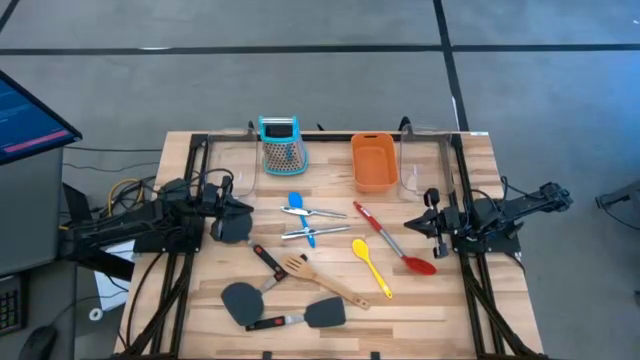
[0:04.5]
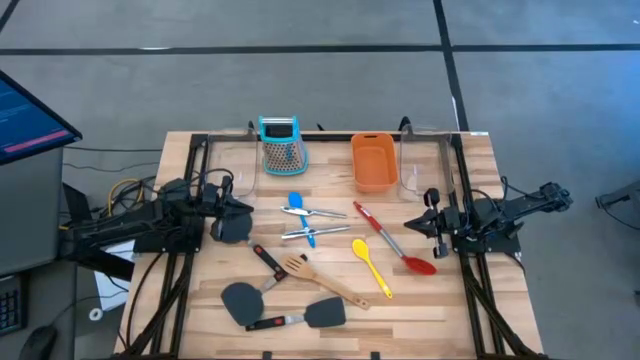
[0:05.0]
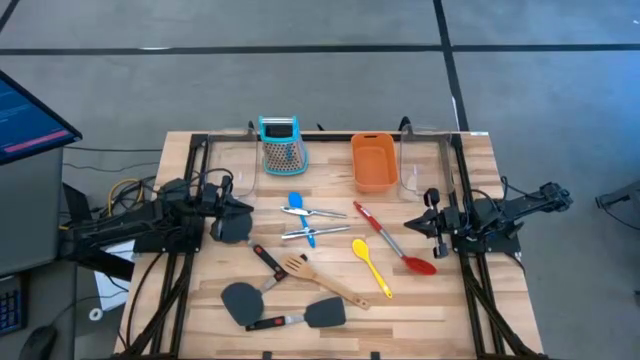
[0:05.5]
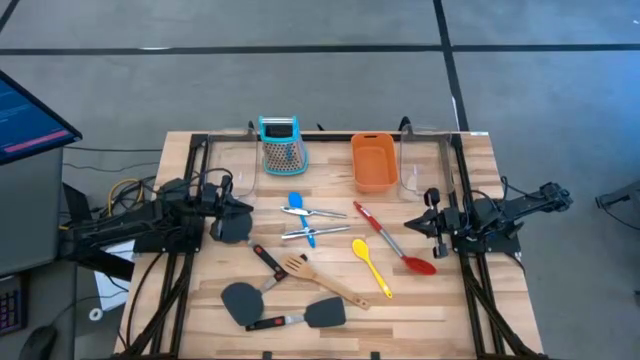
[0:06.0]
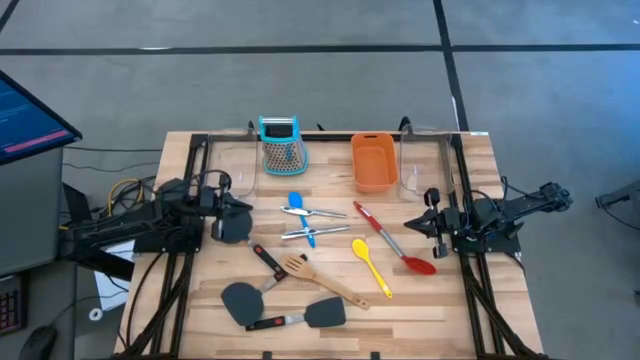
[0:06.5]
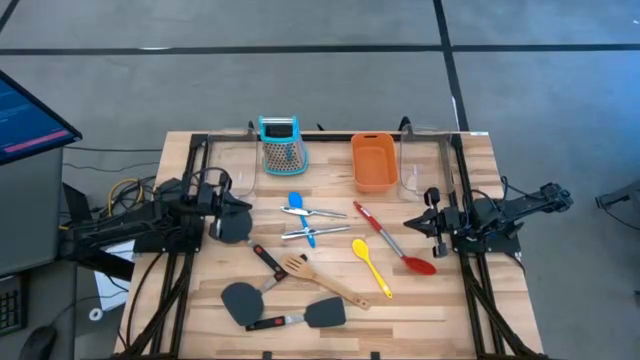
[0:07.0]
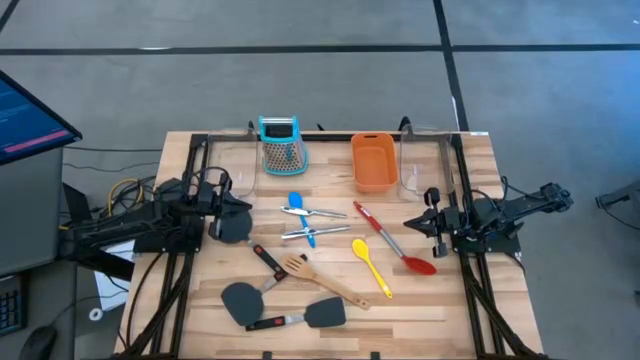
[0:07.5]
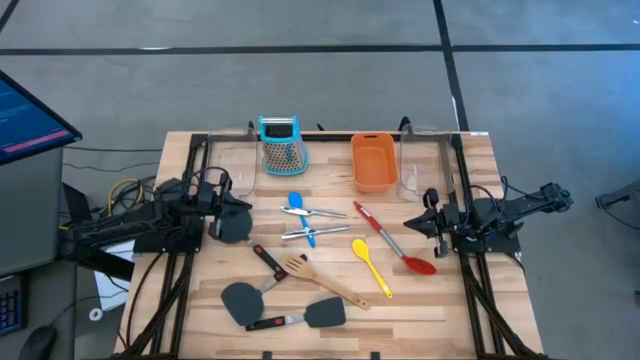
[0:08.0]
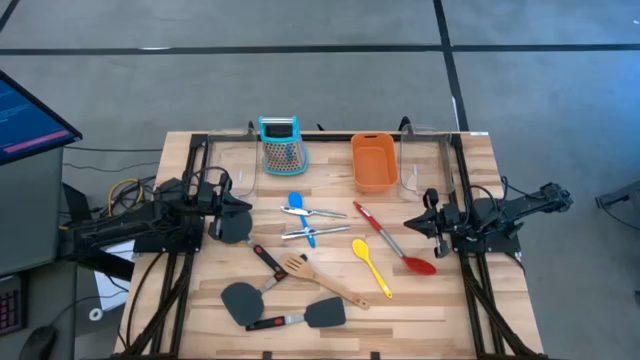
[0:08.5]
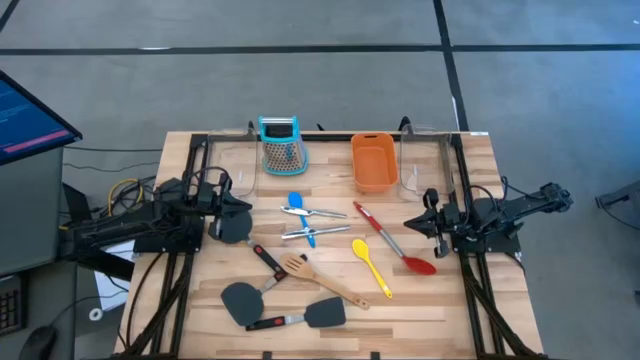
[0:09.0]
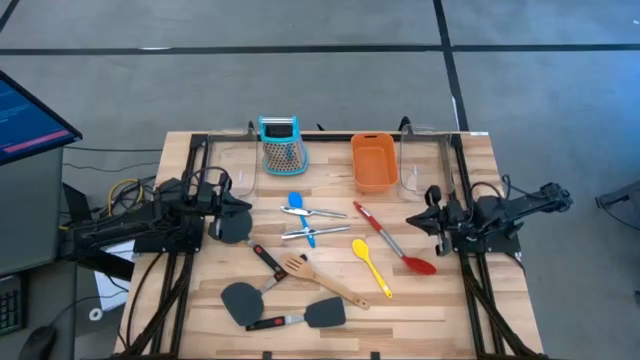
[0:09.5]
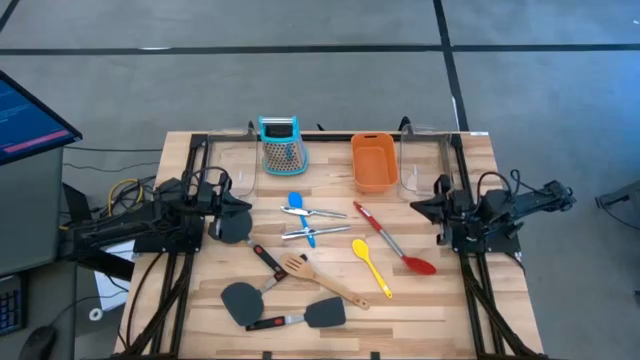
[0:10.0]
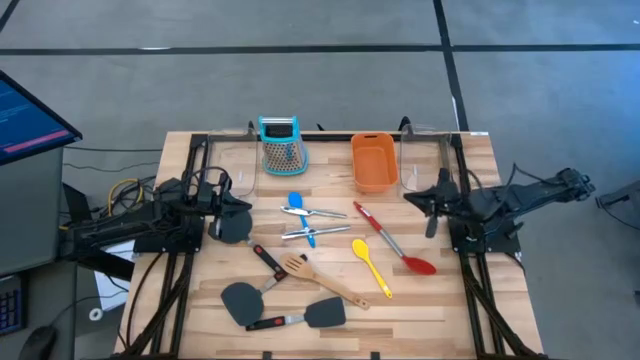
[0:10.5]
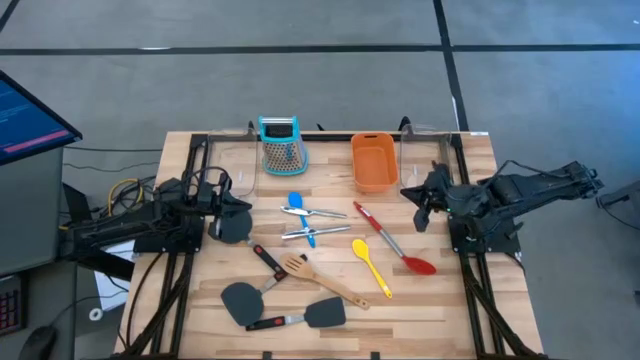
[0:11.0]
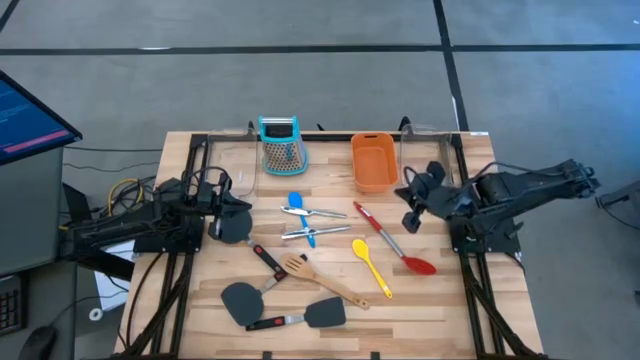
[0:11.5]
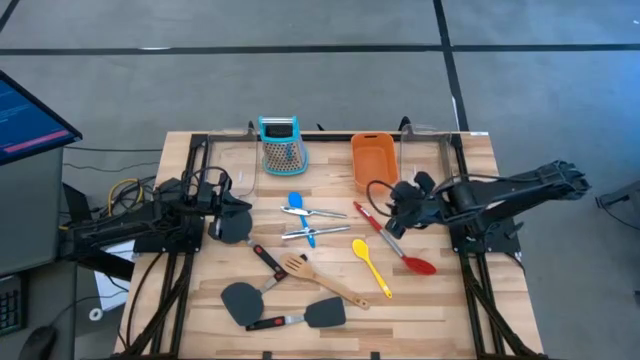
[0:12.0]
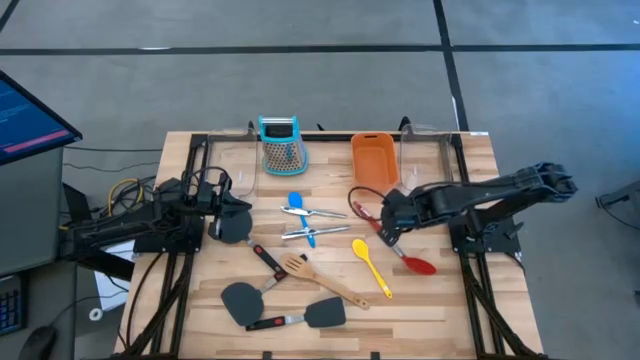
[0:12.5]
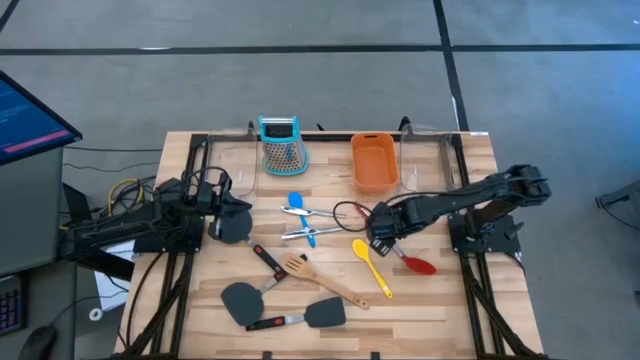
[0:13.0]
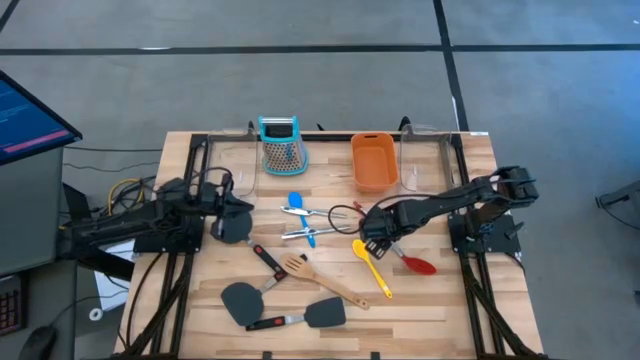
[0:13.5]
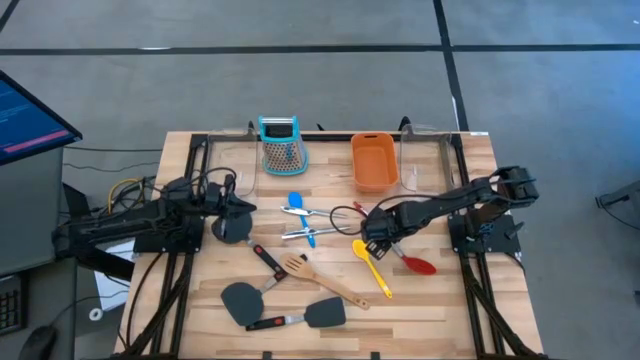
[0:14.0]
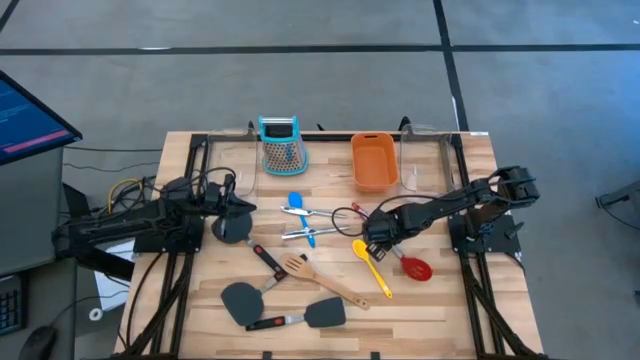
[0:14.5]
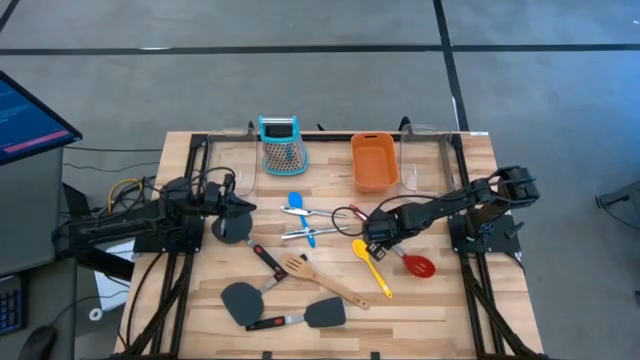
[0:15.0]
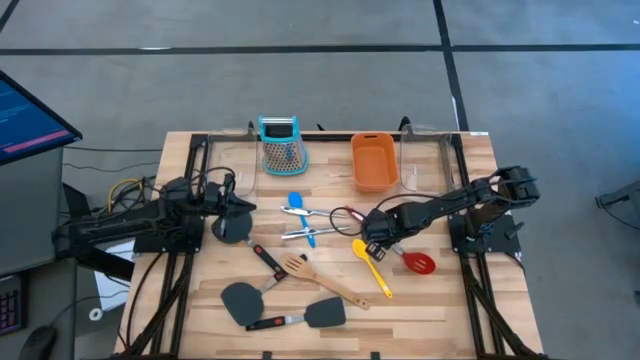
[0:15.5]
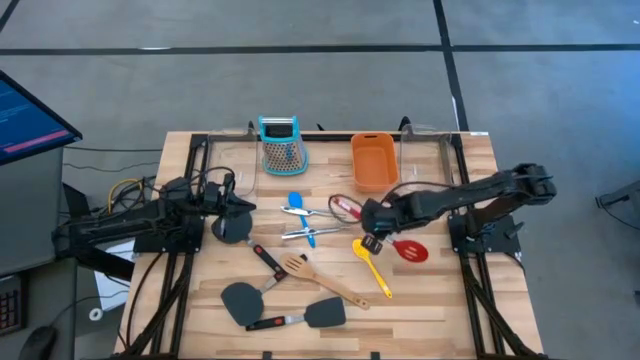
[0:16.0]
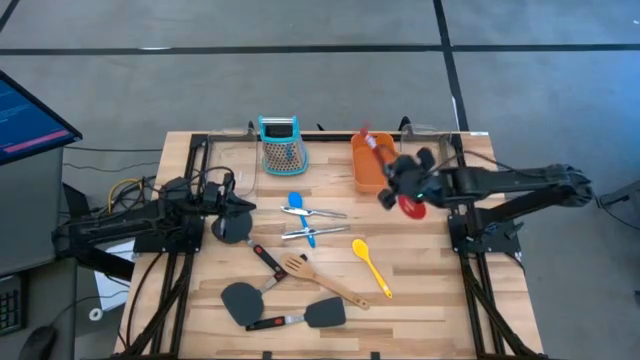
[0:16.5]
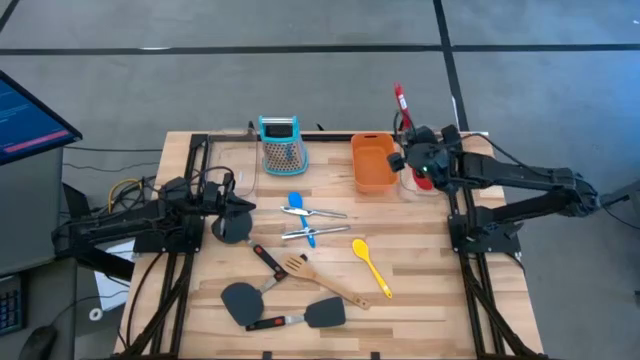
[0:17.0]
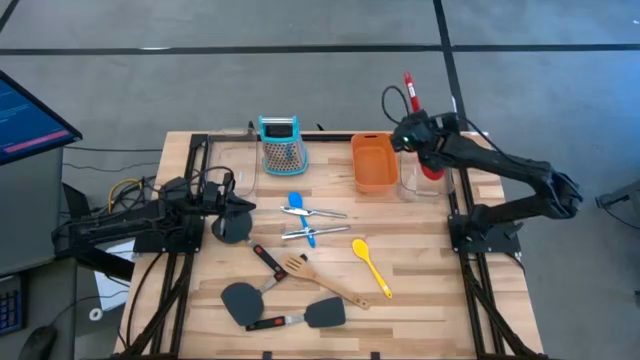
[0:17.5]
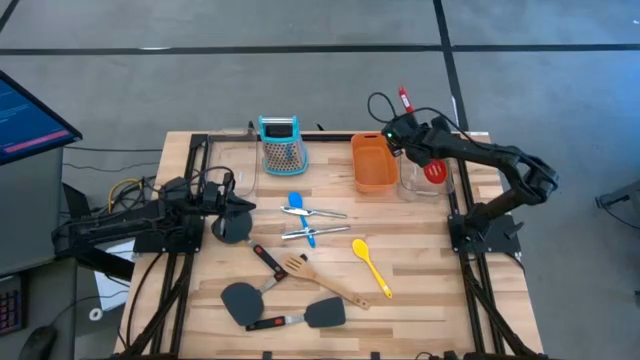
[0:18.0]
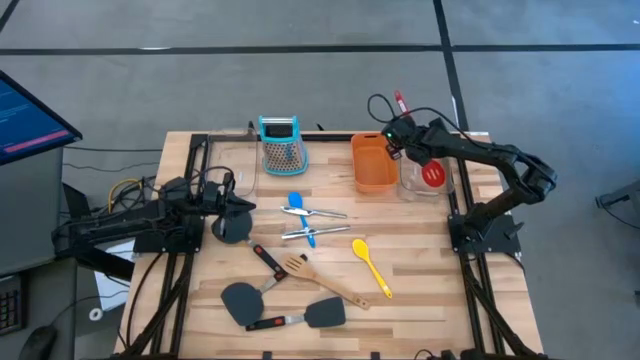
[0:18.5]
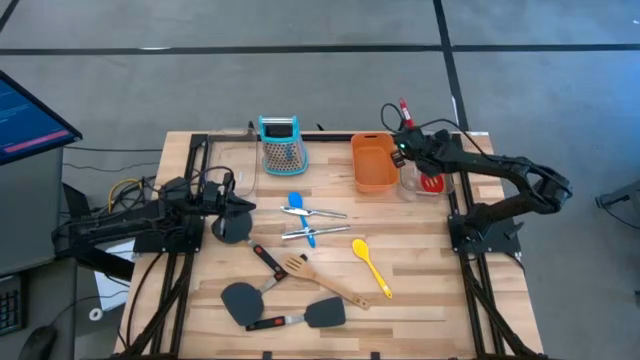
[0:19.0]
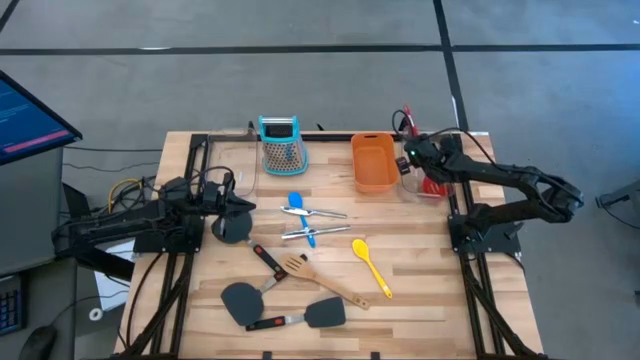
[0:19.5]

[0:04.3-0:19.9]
Task: Pick & Place Kitchen Items
Put the red spatula into the right transparent bin

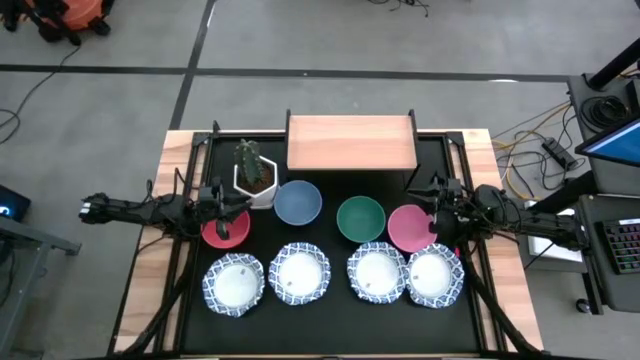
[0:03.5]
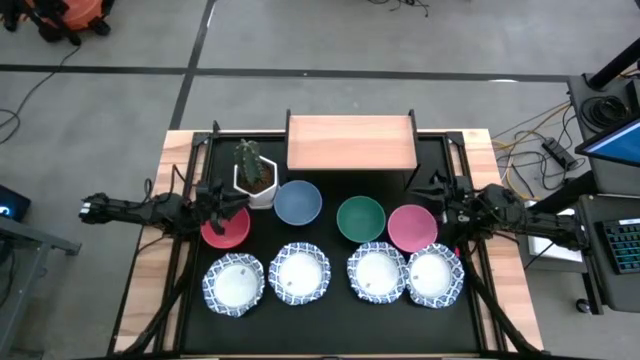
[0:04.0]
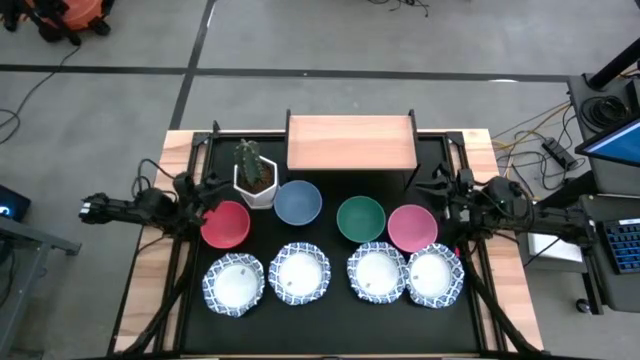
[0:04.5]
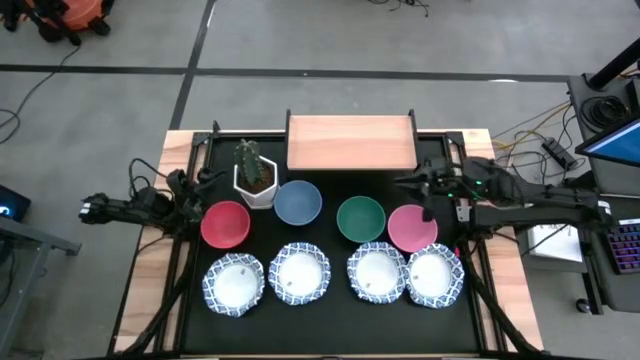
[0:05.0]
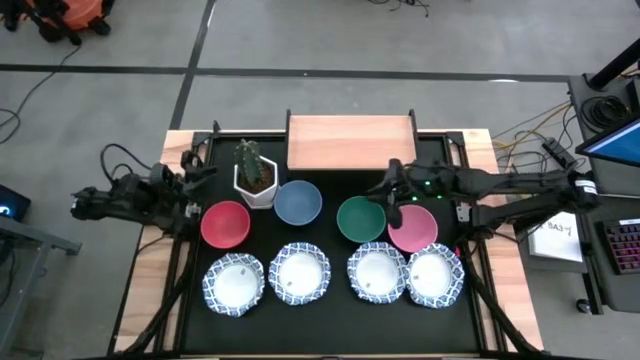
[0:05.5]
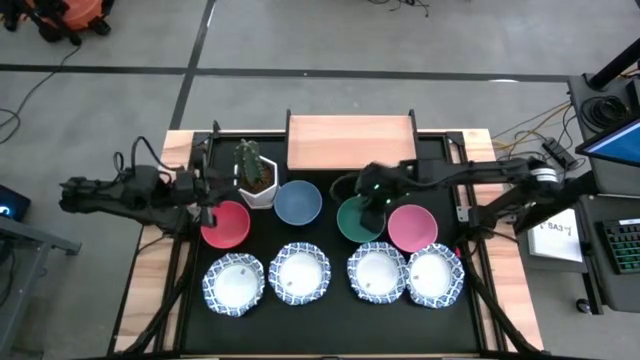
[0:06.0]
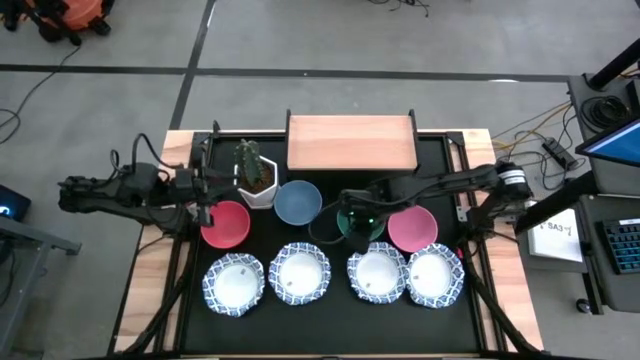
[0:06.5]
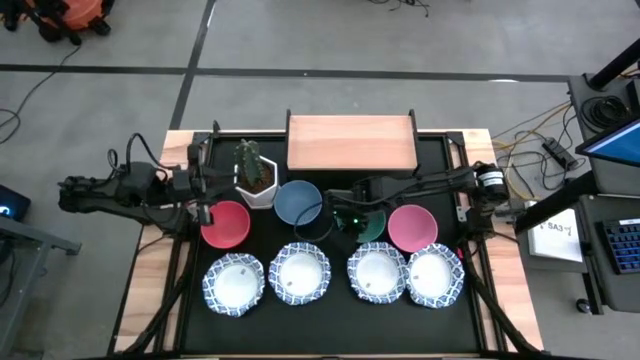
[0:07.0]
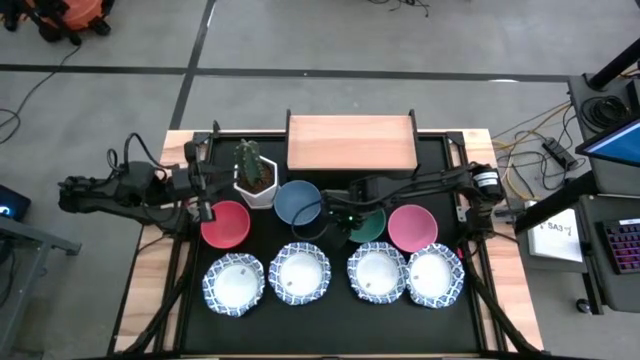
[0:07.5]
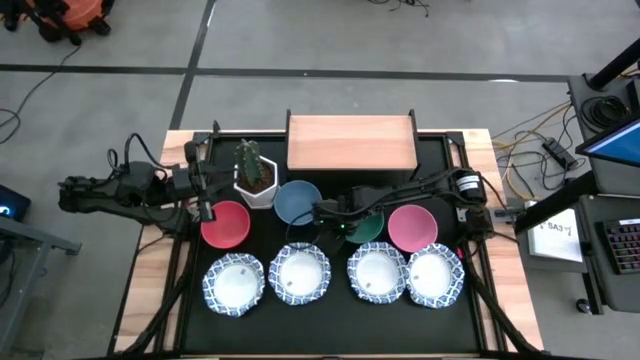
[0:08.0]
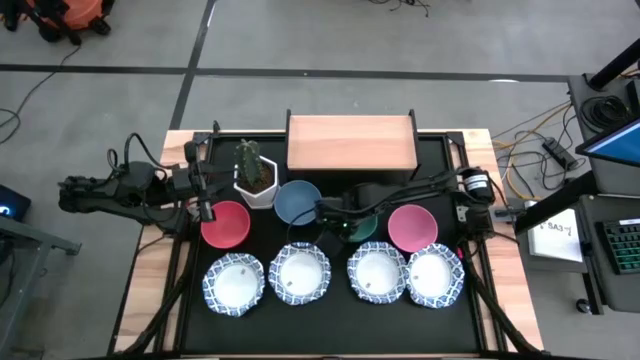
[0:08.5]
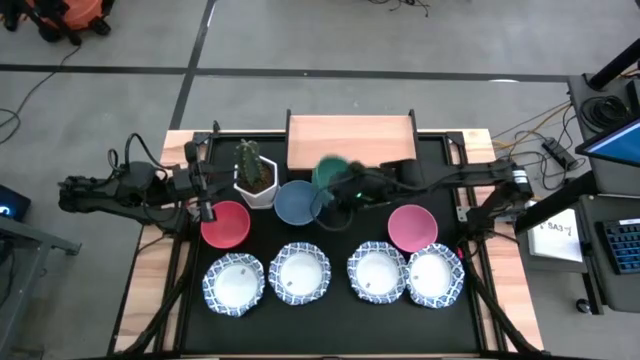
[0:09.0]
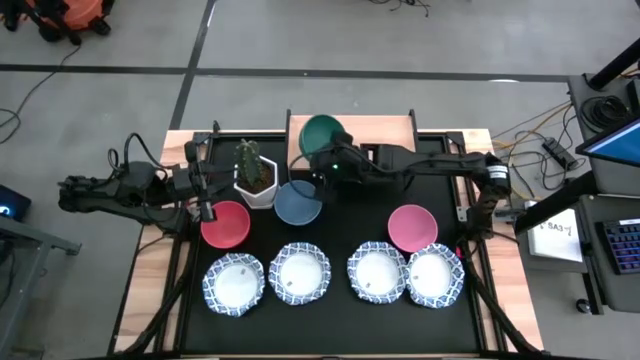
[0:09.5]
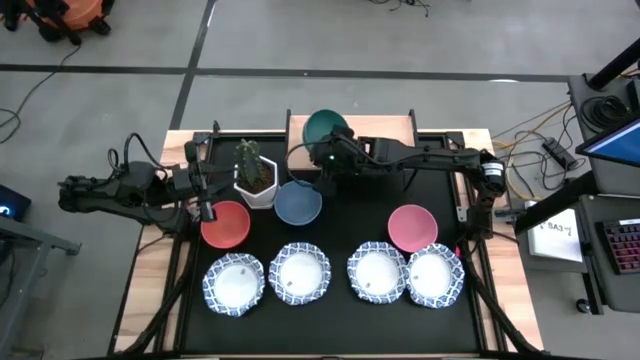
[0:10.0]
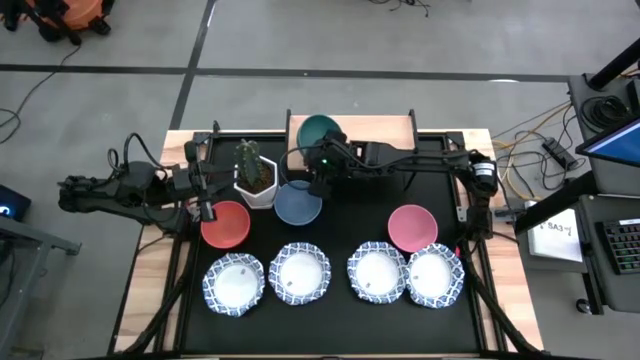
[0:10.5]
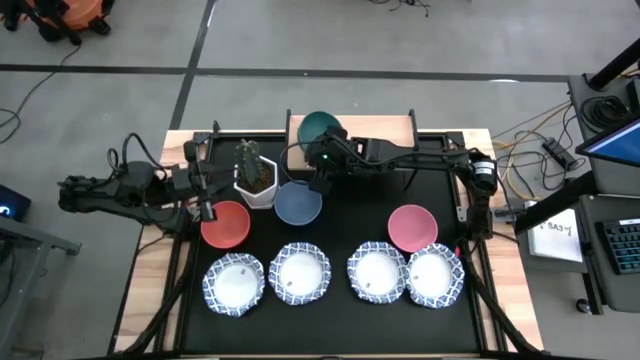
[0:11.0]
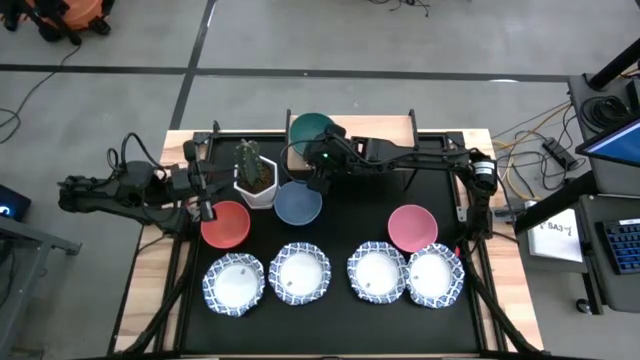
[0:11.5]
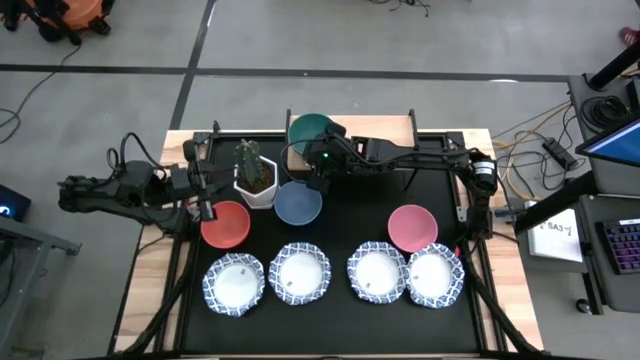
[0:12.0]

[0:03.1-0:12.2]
Task: Place and stack bowls onto a shelf
Put the green bowl on the shelf
